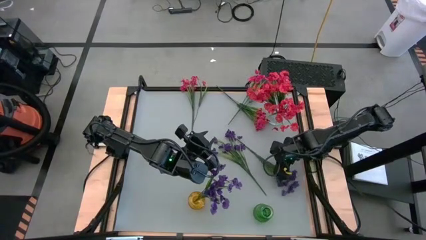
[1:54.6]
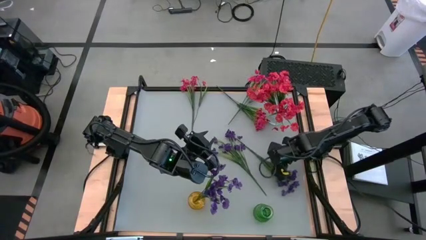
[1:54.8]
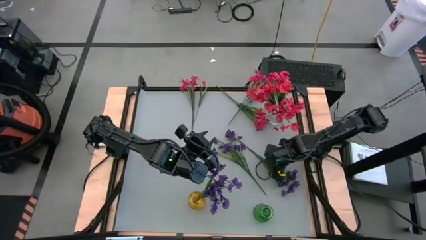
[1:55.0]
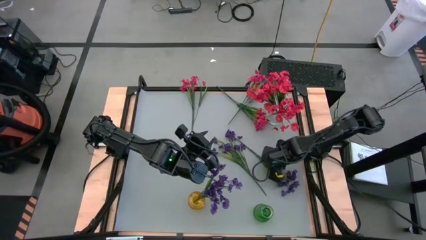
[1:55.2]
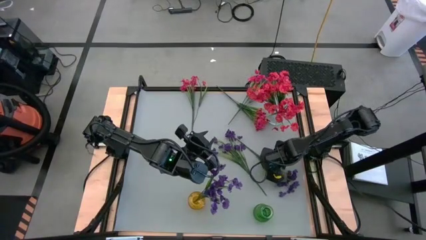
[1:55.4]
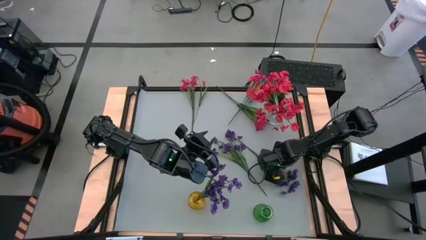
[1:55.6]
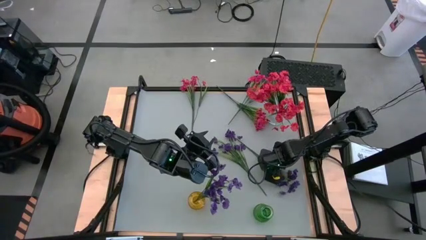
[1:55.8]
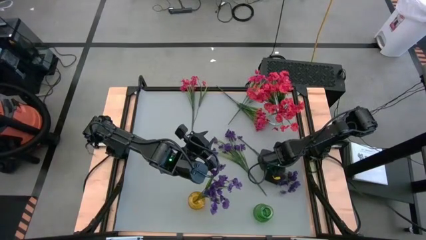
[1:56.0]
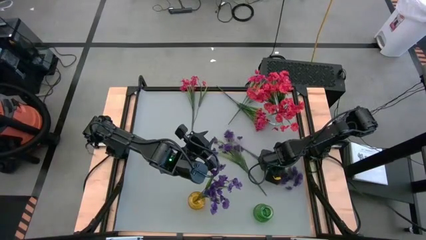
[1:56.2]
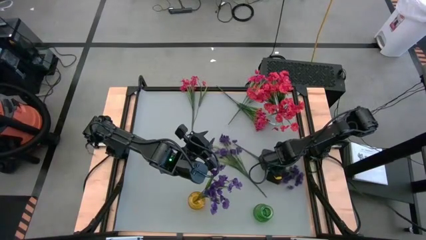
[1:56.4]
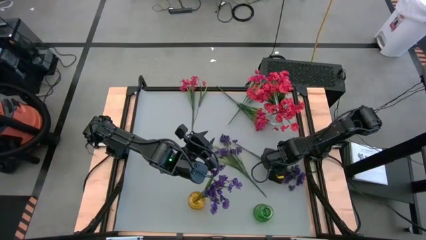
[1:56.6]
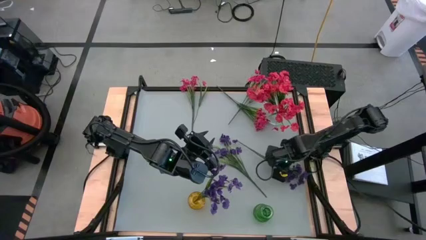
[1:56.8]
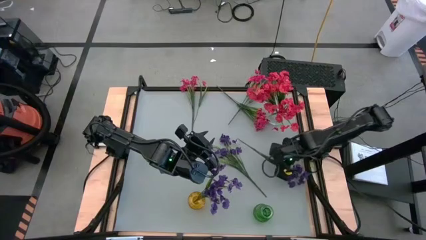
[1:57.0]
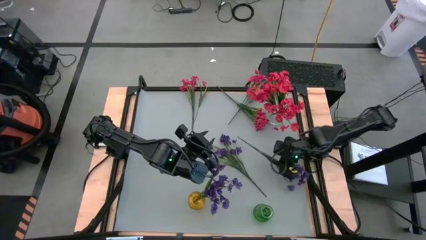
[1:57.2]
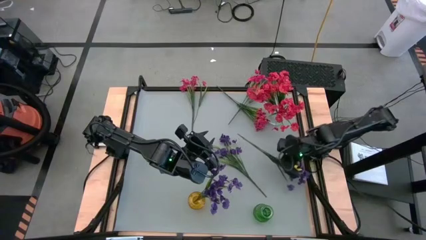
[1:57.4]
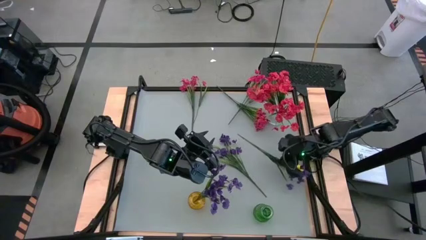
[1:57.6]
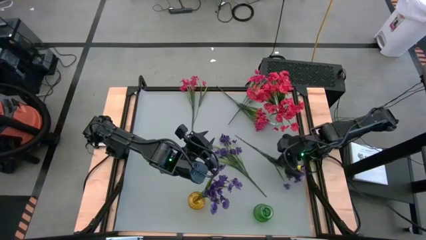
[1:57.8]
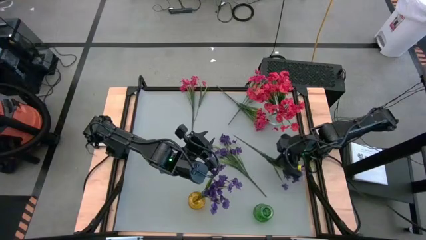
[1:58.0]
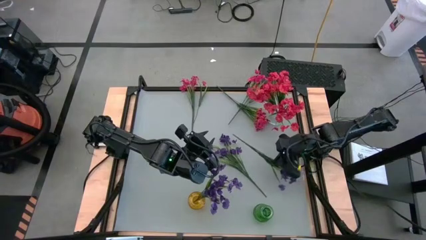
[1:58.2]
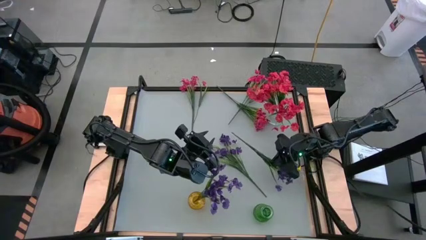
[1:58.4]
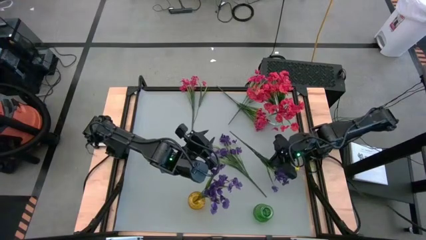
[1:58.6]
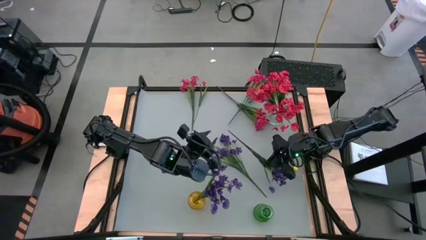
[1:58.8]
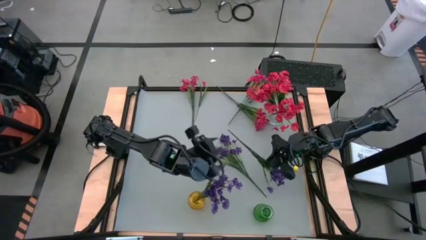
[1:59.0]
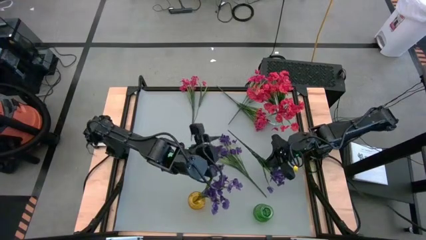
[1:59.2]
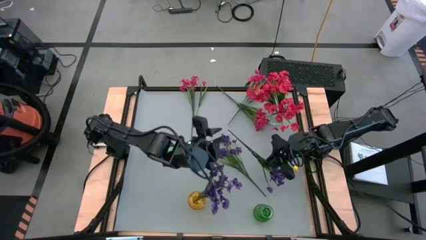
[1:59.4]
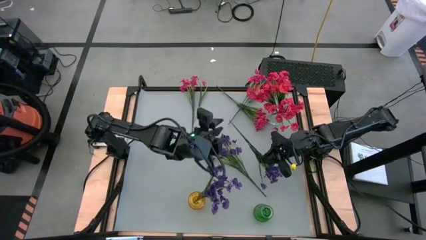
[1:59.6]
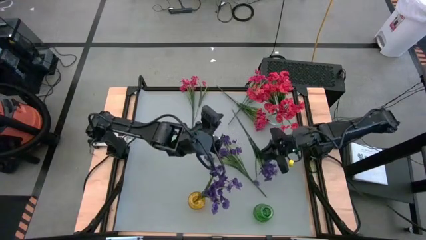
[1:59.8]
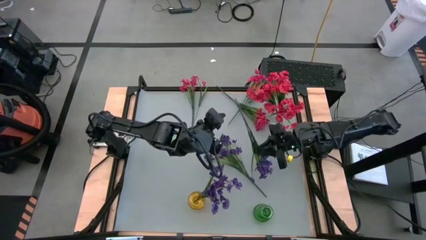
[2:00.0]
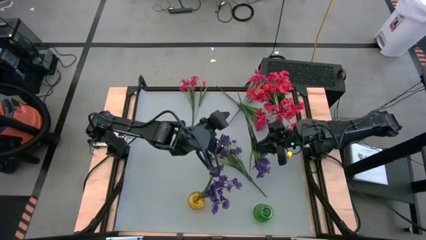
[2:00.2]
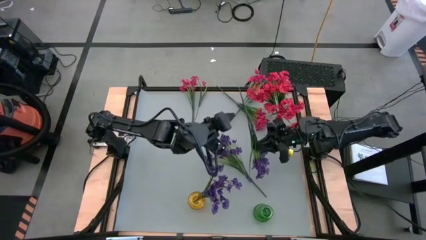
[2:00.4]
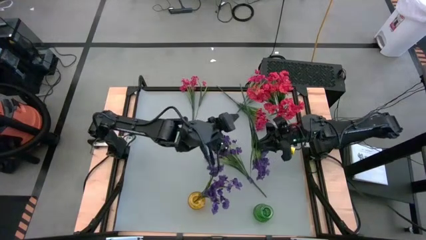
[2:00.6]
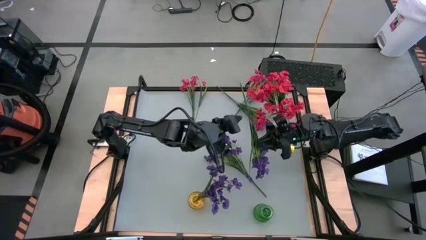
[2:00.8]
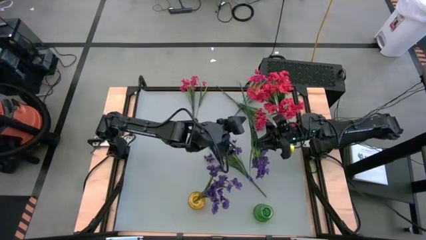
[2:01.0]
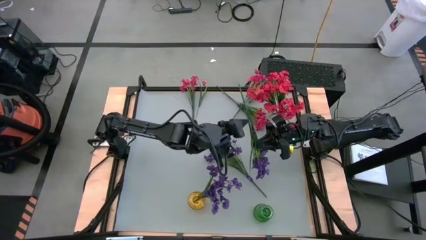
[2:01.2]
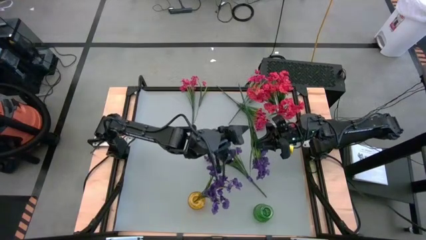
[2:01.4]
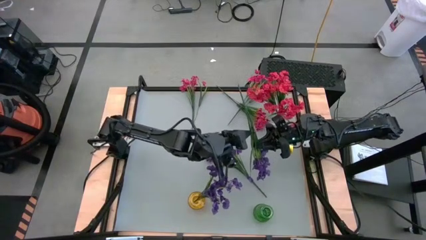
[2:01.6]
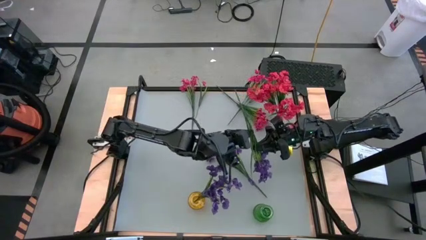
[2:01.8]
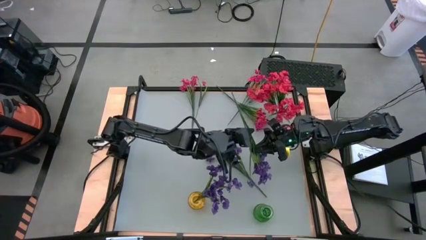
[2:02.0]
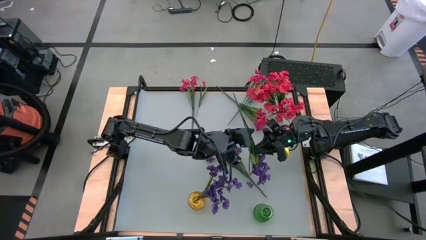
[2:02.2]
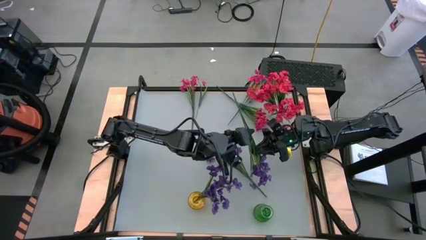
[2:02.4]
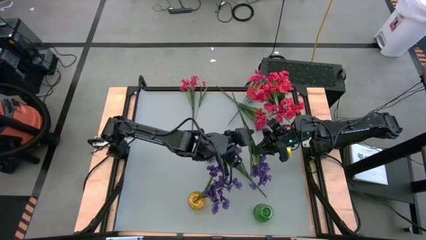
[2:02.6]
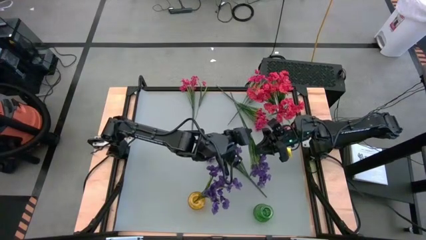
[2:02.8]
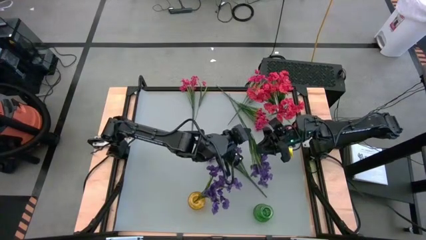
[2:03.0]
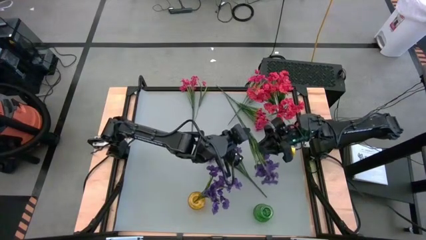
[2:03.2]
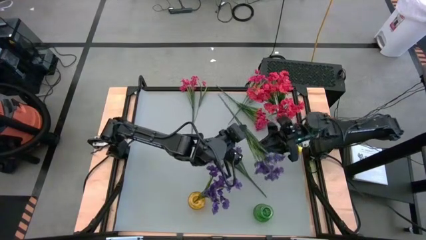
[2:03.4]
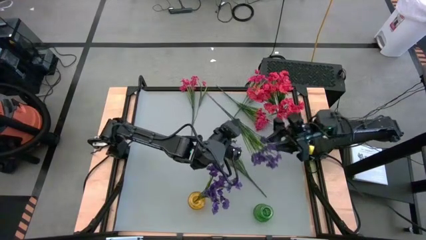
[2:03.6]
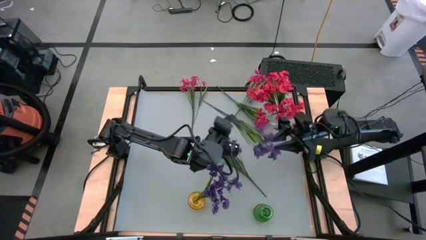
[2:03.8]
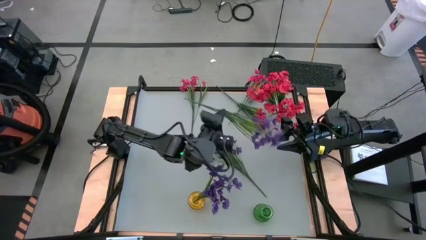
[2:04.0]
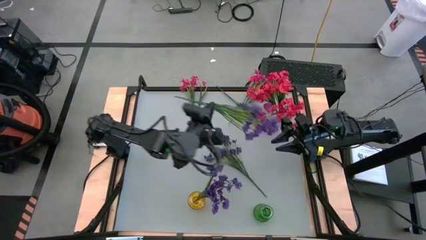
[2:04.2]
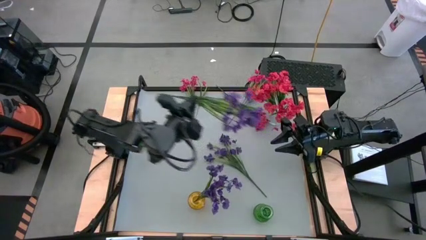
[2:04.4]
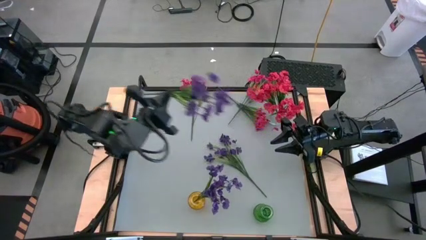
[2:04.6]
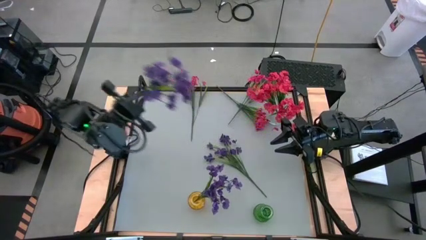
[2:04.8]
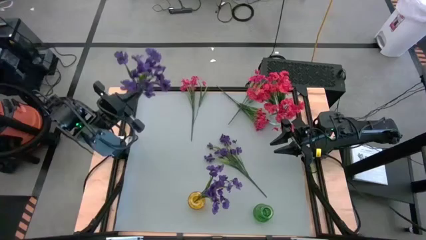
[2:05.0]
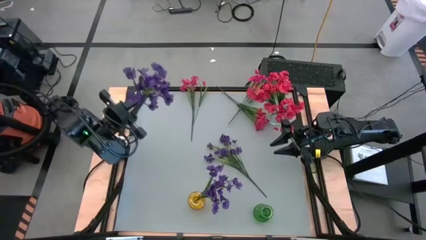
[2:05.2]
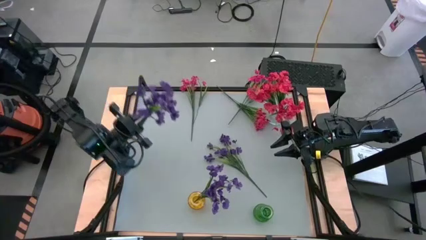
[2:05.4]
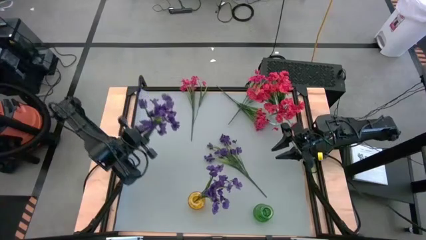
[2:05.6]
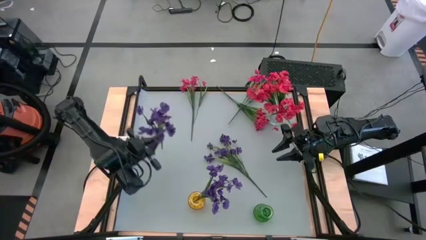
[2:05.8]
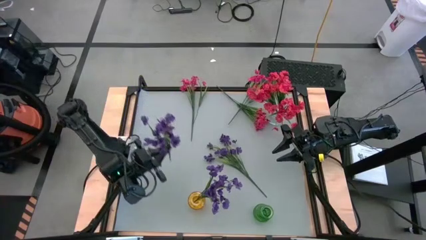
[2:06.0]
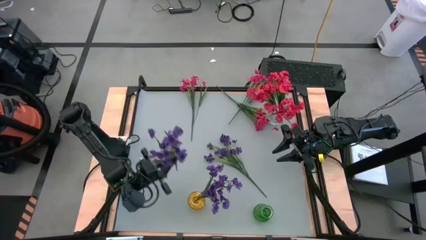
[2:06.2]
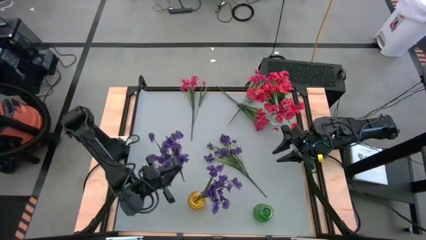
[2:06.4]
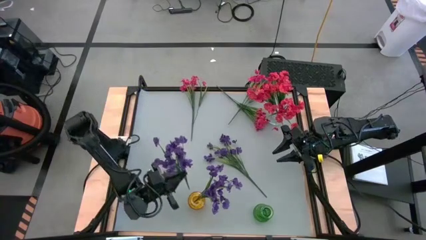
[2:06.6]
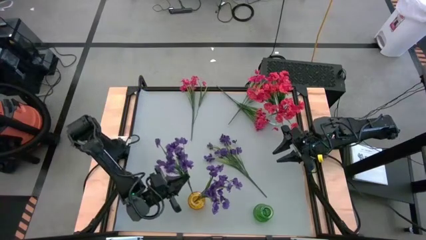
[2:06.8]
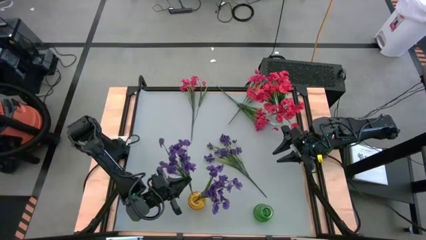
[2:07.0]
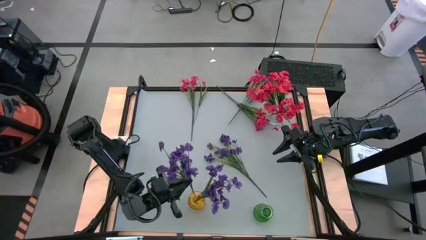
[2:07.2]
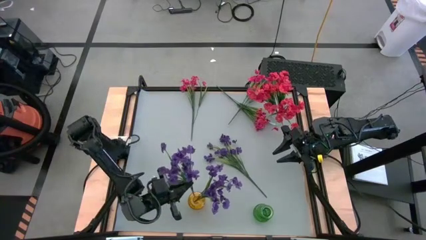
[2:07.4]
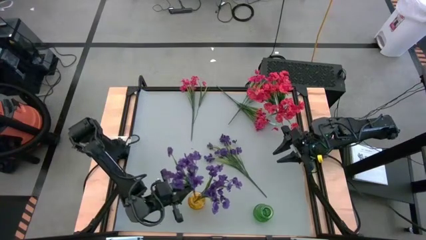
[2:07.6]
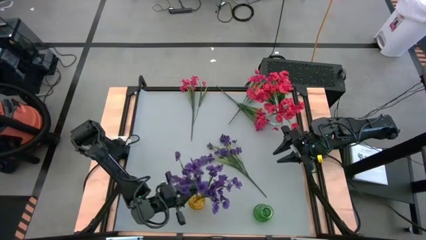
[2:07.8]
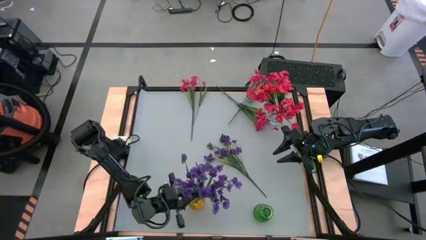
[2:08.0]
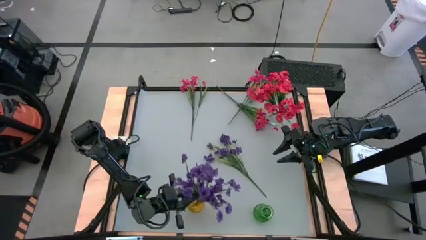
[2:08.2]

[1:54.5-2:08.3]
Task: Sort flowers into vase by color
Put the right purple flower into the yellow transparent vase

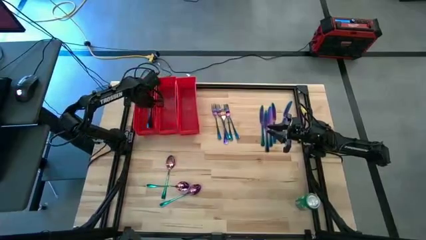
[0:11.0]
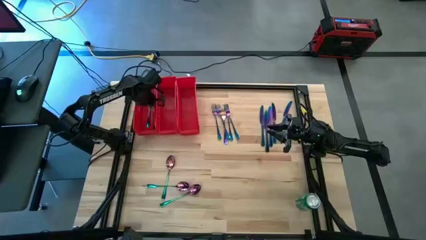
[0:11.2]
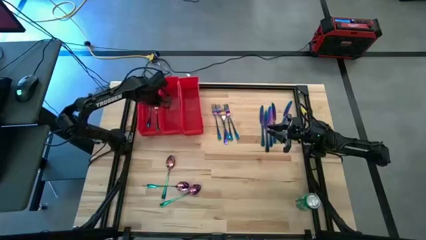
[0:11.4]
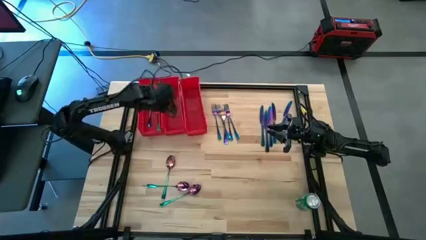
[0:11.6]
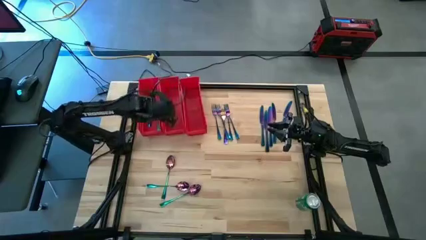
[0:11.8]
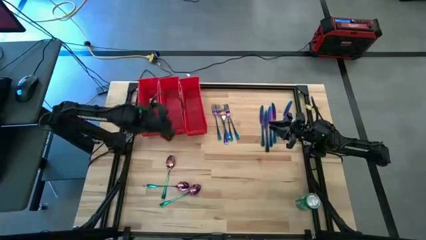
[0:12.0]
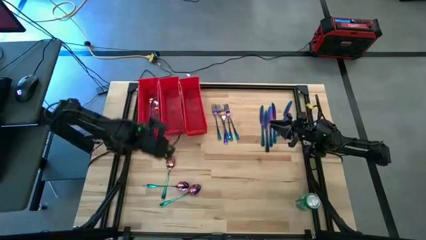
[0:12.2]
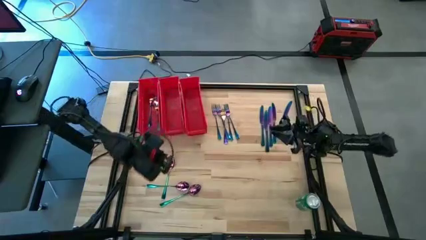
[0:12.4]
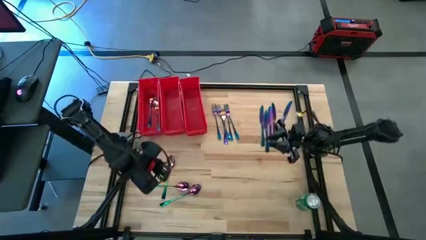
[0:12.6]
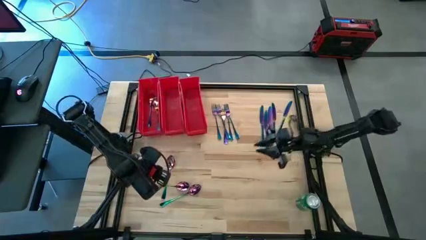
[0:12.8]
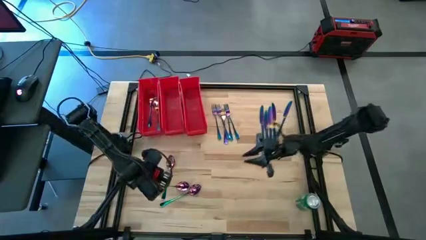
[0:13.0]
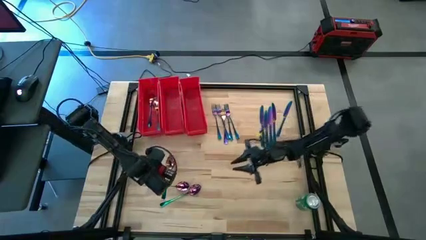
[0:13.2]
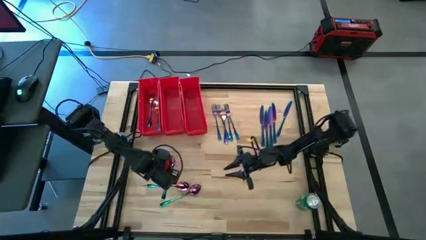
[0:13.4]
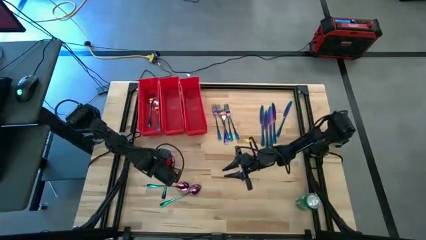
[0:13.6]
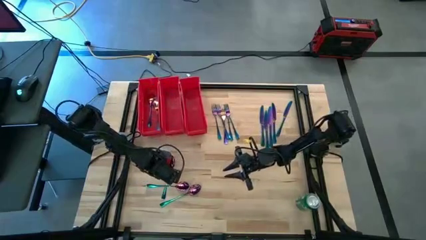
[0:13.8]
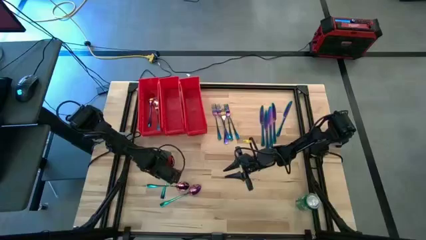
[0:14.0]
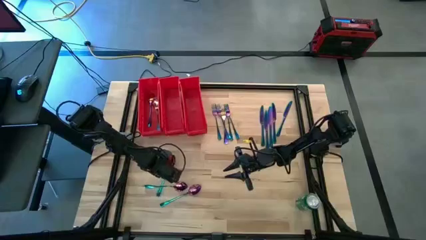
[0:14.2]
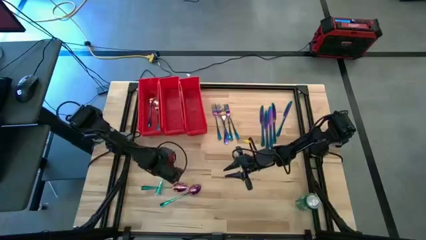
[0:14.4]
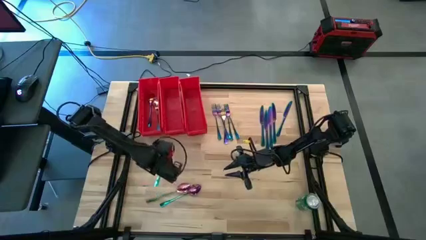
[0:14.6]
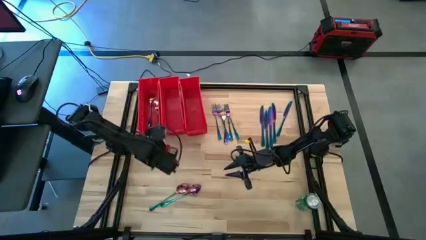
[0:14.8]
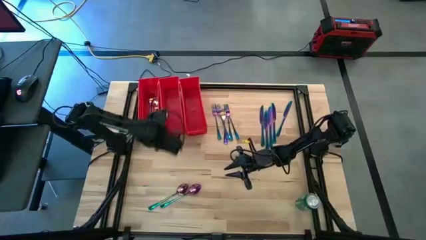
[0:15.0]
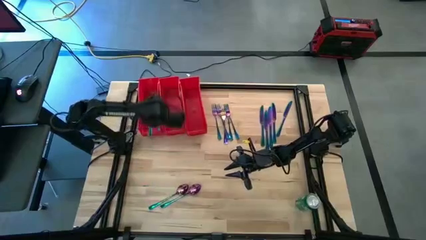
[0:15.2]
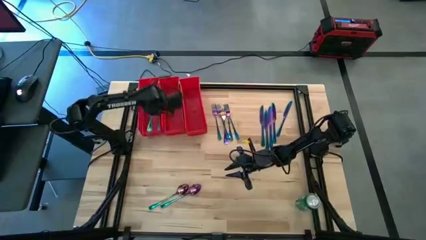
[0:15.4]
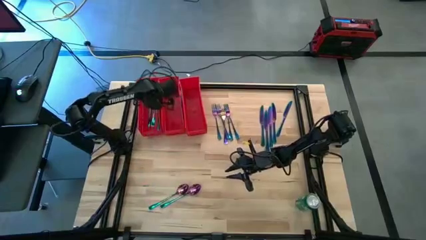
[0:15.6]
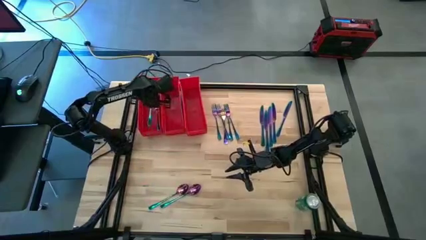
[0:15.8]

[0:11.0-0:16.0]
Task: Sort silverware
Put the blue spoon into the left red bin
